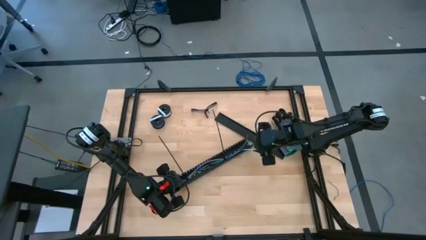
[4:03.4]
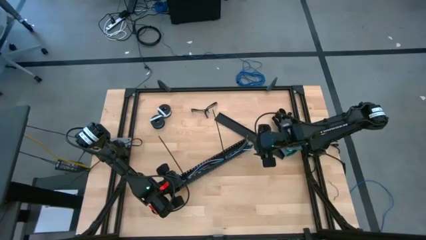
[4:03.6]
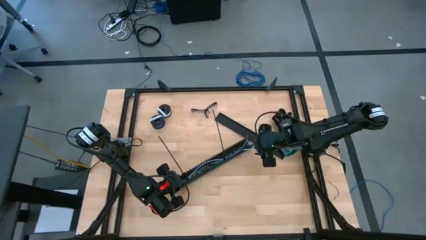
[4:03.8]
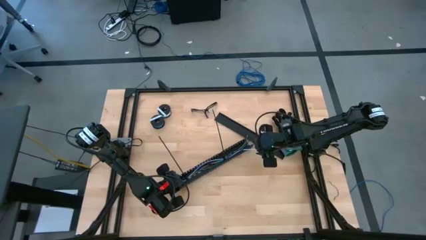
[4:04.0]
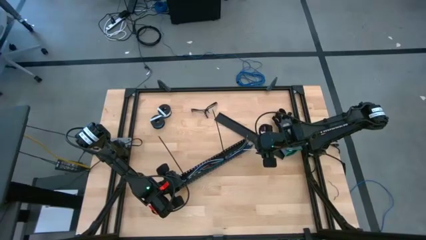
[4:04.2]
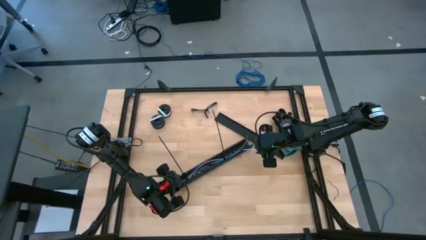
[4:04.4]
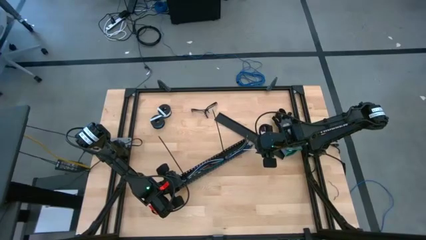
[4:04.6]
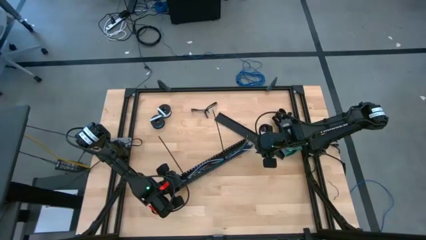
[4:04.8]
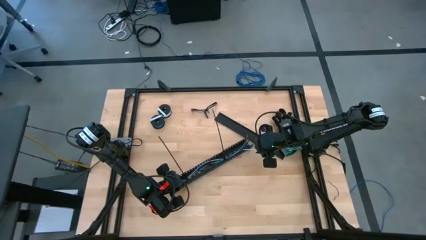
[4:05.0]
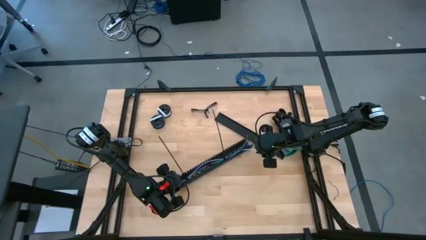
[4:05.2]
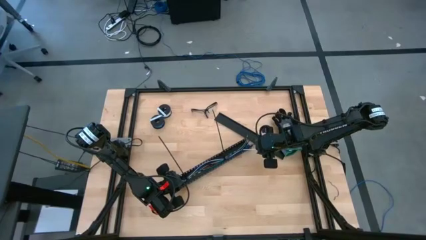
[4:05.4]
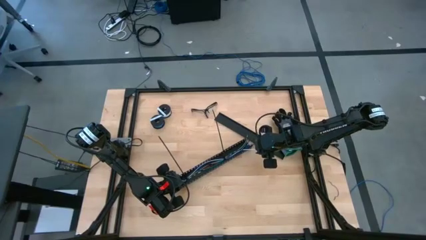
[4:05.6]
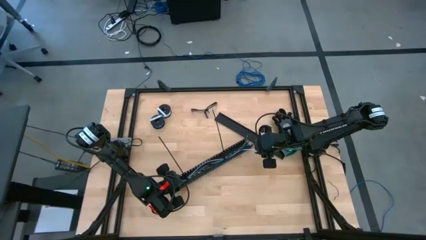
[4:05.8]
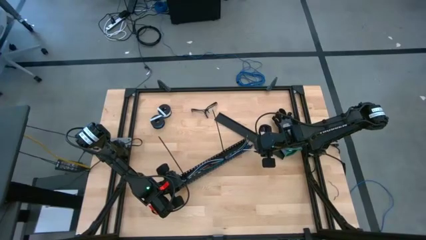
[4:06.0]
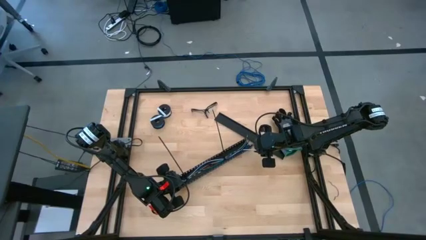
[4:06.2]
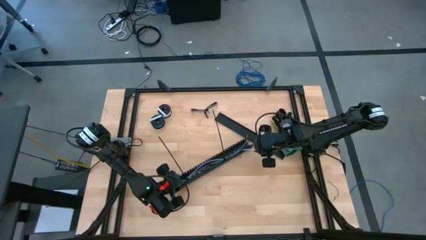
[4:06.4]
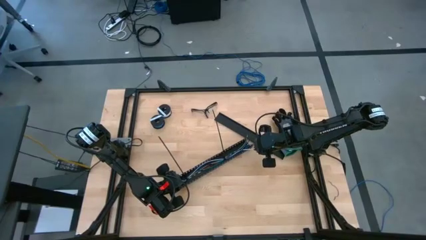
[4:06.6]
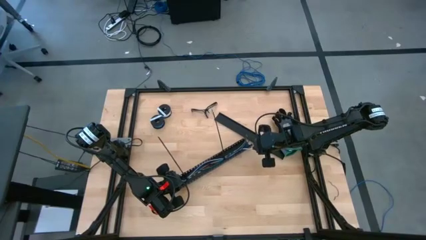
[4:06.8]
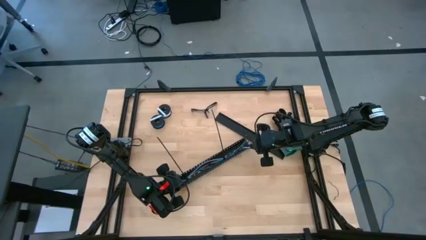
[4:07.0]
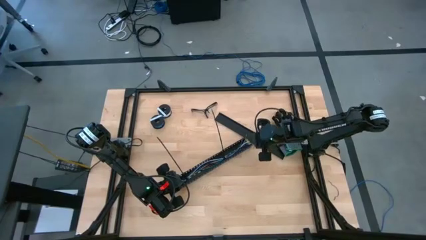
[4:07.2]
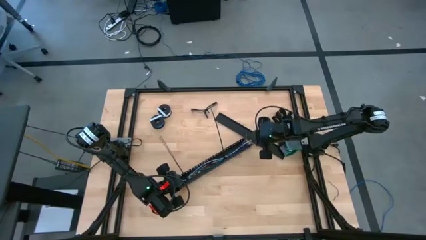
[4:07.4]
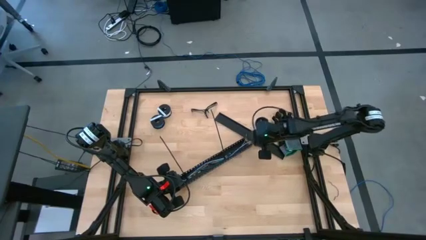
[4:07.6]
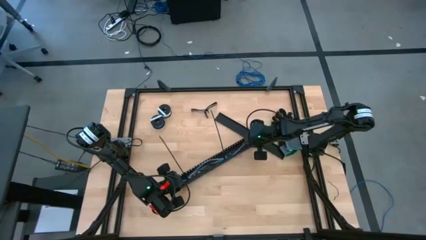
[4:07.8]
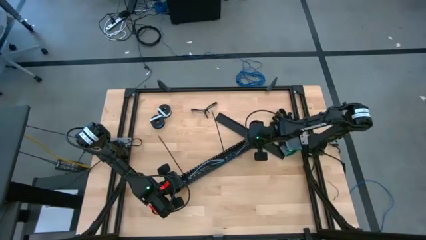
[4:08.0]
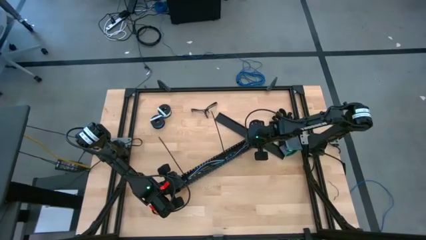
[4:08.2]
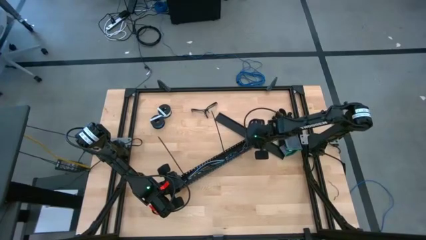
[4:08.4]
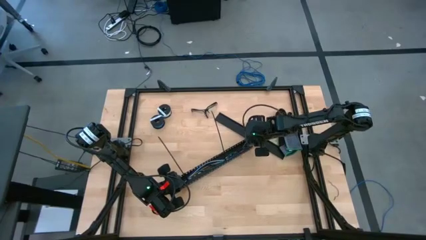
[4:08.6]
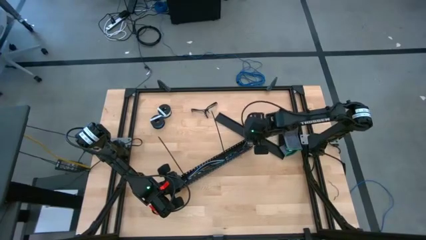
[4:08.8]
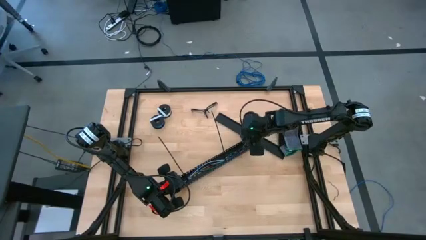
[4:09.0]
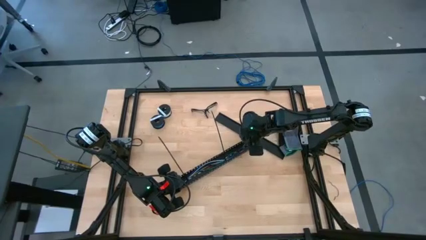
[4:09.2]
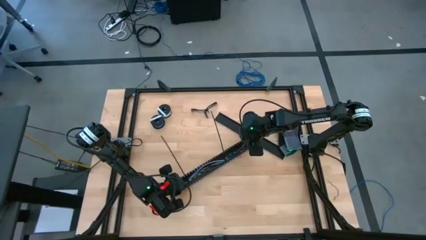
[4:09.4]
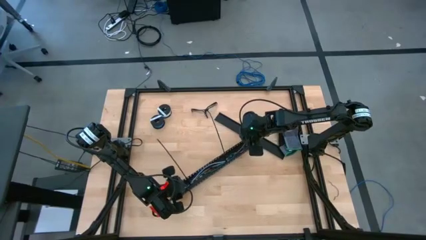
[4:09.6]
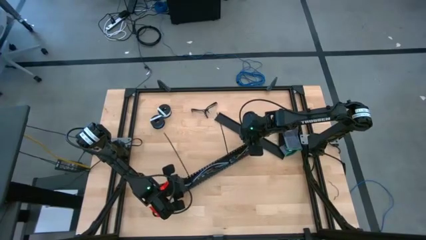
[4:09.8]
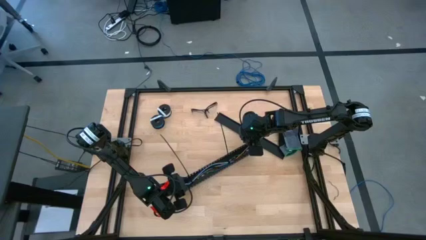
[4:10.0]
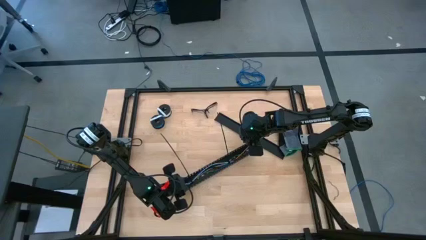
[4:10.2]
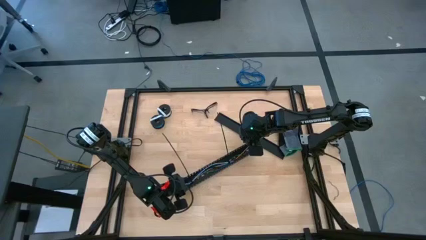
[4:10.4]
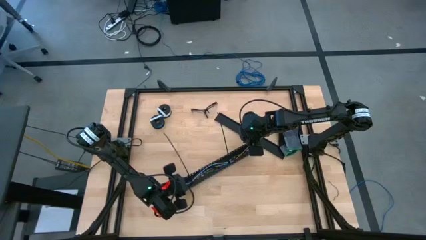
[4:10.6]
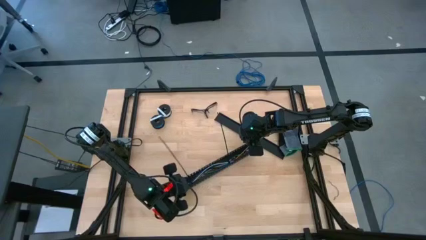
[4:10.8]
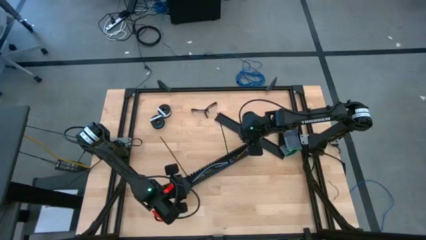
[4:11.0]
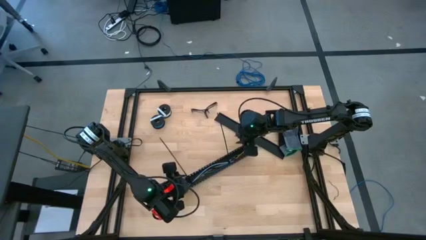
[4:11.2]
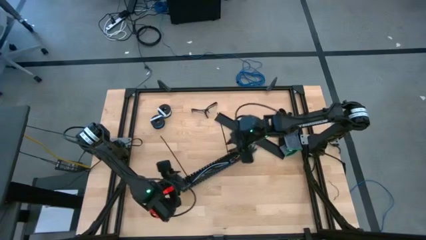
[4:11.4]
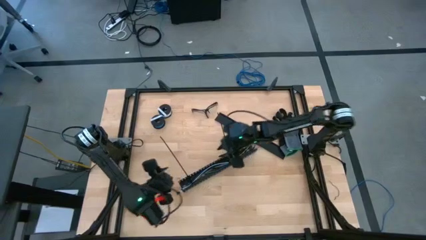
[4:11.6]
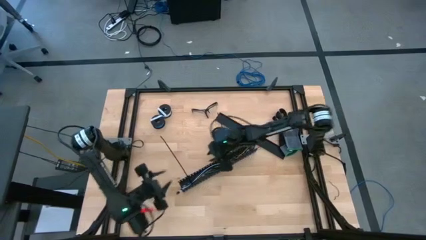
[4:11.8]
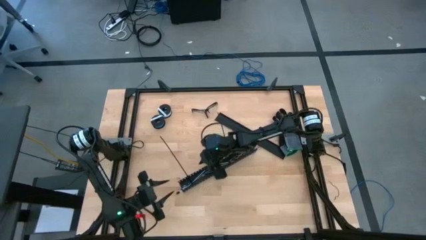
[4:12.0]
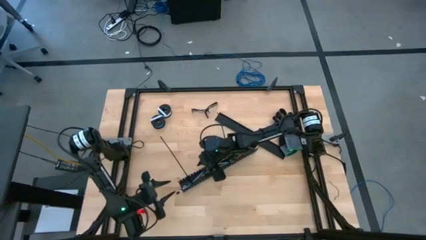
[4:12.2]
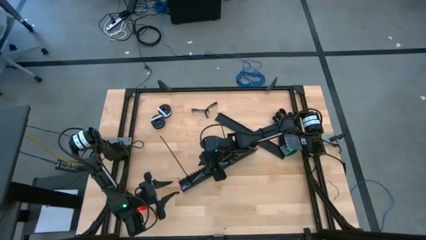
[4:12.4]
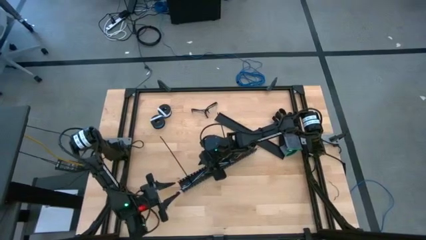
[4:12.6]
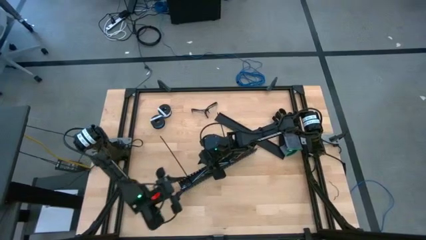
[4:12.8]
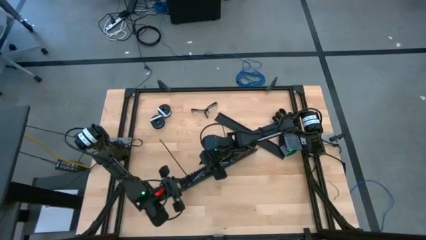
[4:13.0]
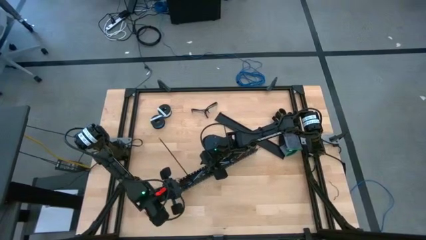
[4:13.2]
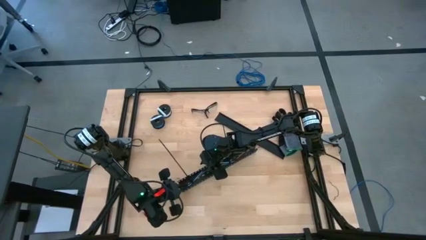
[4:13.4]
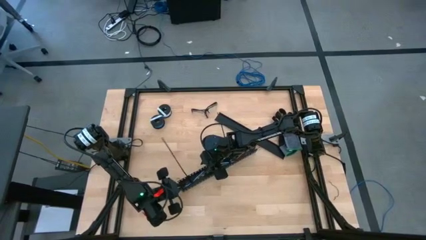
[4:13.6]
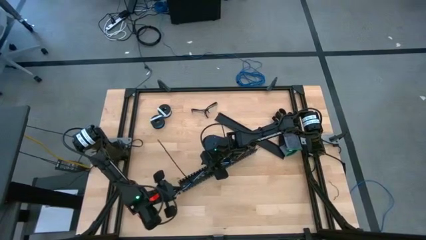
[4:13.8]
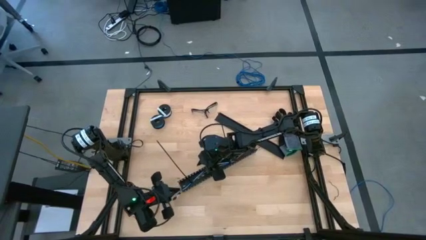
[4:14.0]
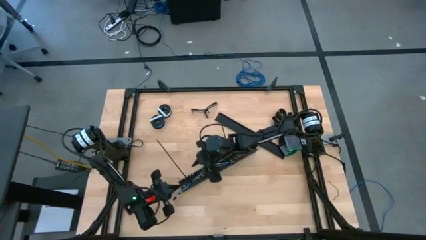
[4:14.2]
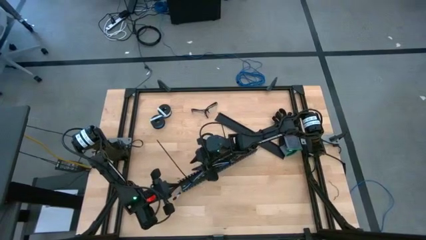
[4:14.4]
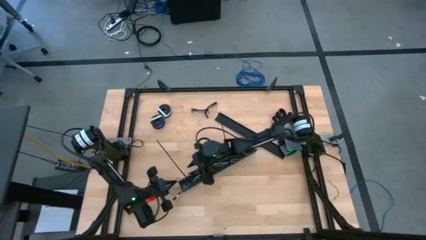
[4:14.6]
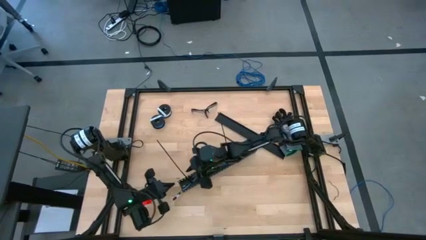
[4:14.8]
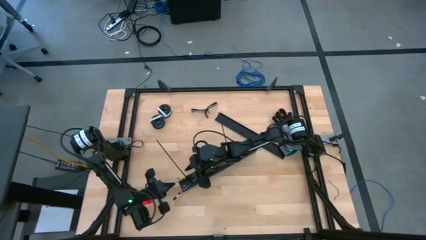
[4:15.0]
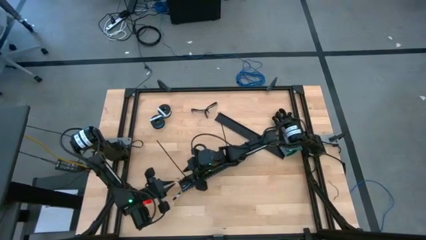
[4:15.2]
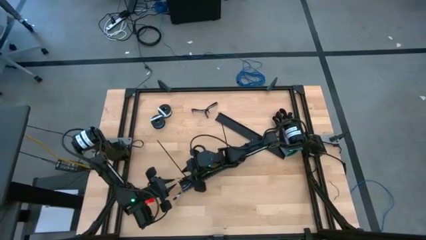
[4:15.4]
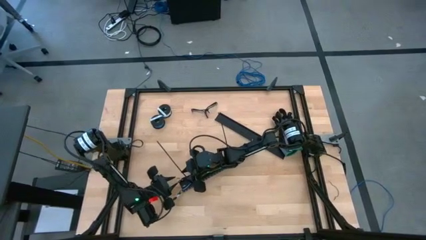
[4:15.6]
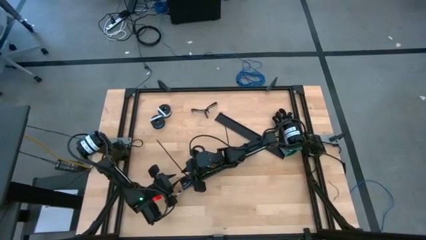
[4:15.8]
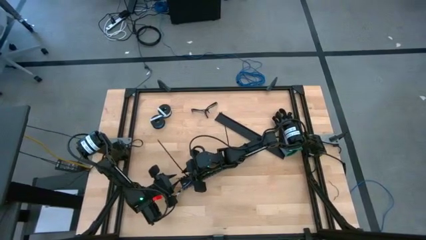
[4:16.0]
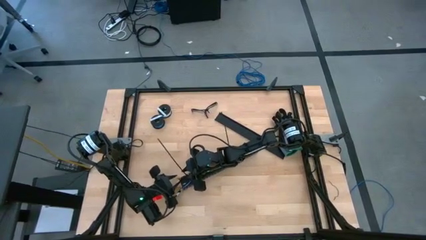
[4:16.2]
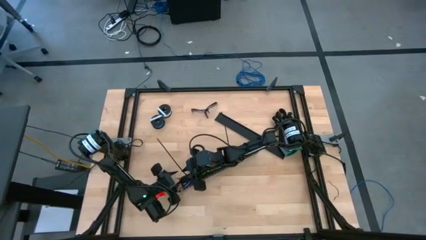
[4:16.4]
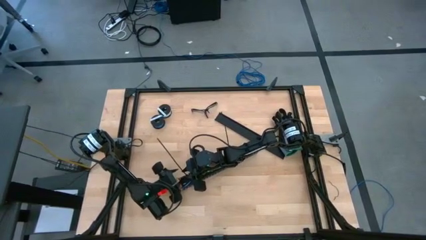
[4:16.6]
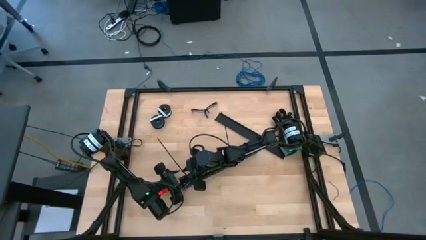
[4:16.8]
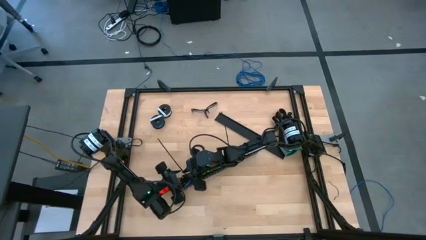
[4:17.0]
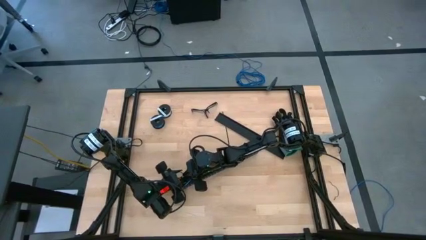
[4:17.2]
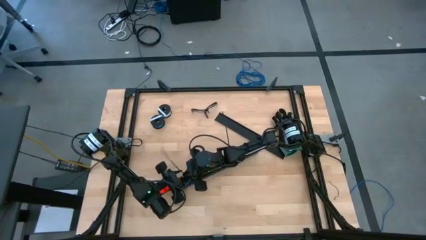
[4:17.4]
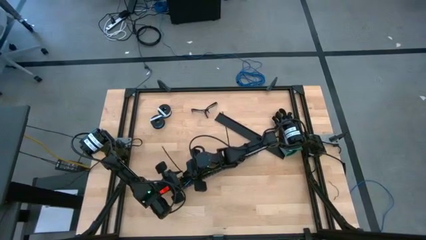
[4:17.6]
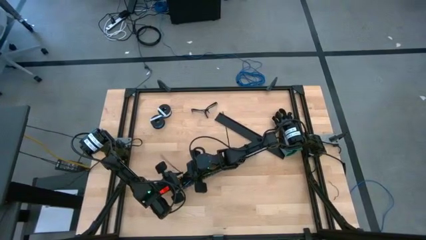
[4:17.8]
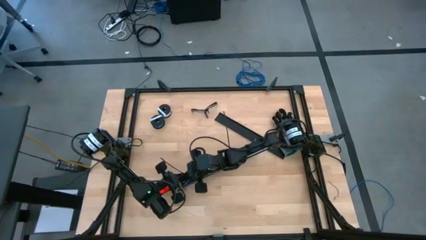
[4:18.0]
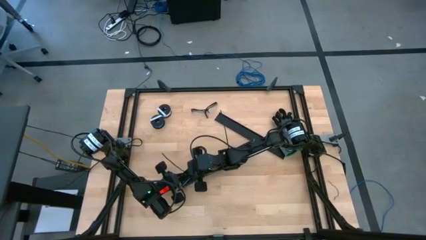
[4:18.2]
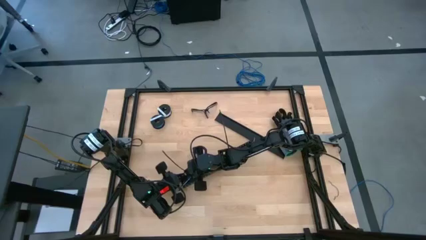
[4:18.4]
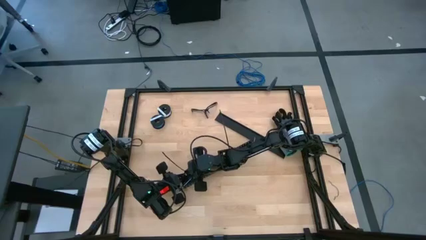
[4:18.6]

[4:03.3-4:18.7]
Task: Ziptie cables
Put the wrapped cables into the black cable duct
